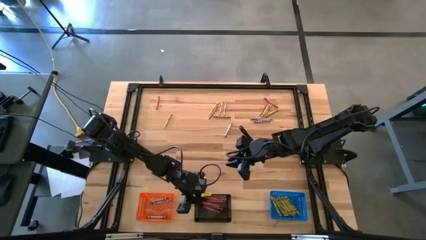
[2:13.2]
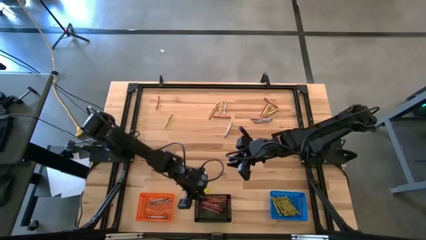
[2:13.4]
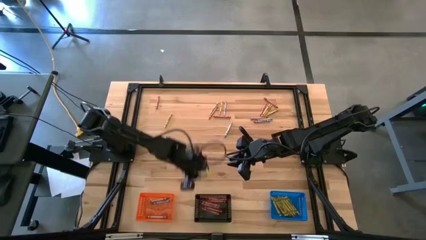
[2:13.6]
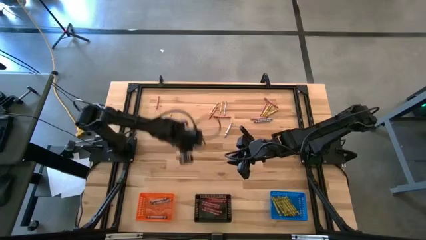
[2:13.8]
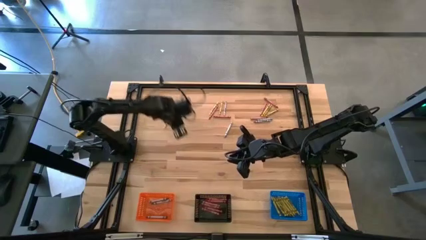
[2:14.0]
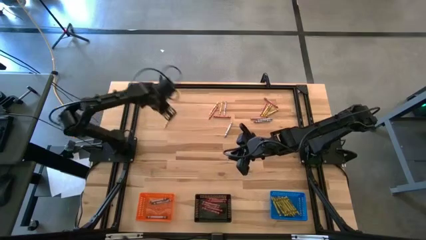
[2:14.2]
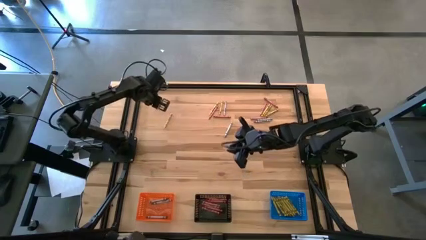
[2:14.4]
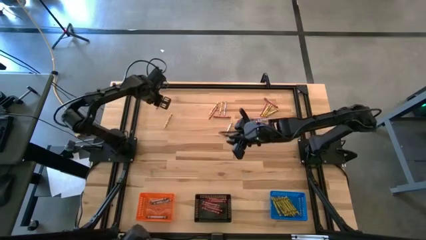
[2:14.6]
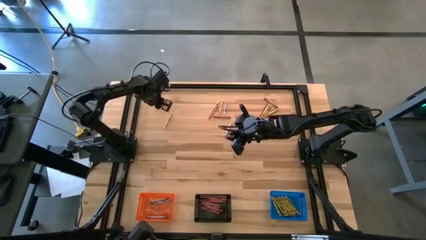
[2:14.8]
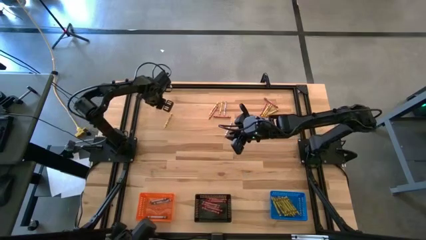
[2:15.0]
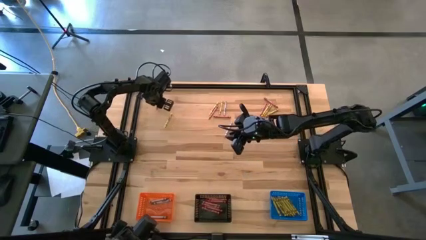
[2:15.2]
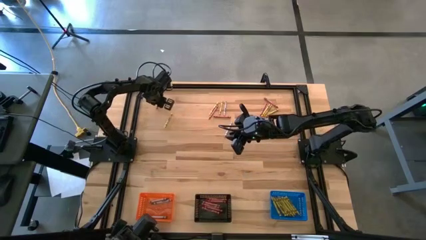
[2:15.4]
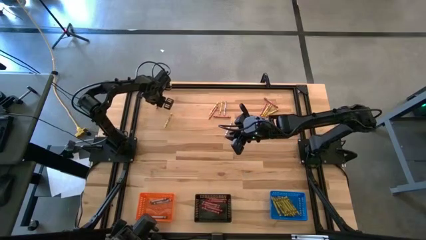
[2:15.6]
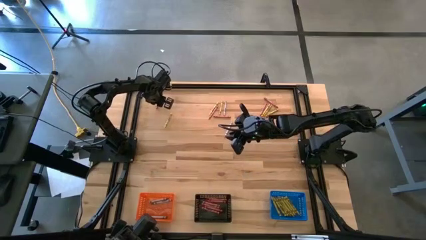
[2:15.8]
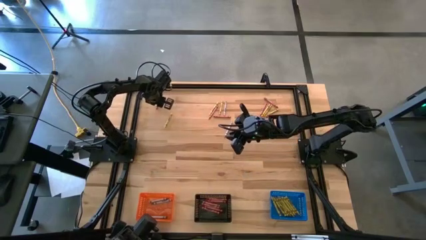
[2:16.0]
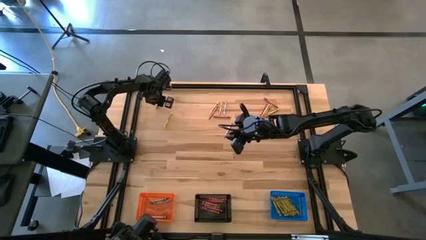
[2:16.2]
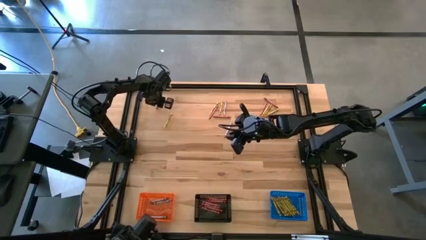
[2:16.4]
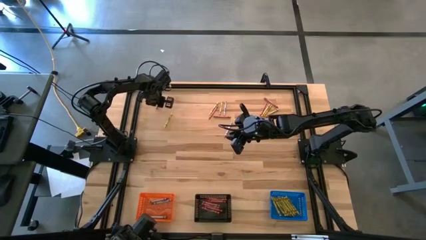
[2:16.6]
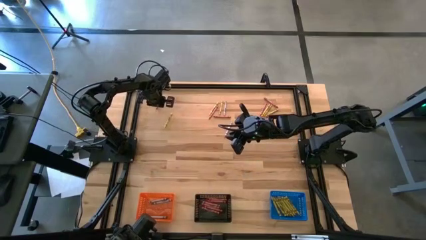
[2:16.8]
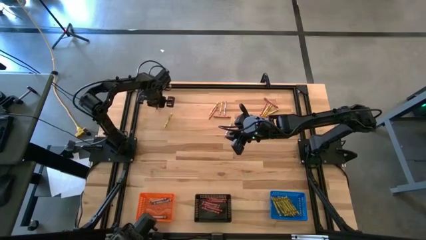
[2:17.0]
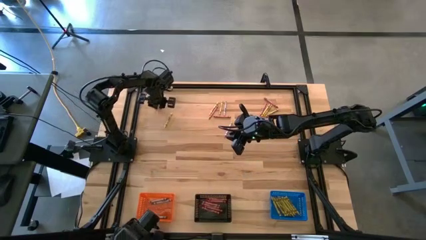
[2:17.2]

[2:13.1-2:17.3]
Task: Sort crayons
Put the red crayon into the black bin

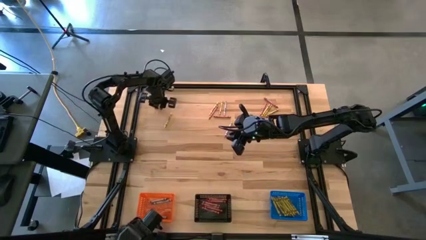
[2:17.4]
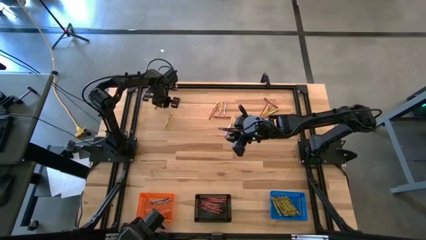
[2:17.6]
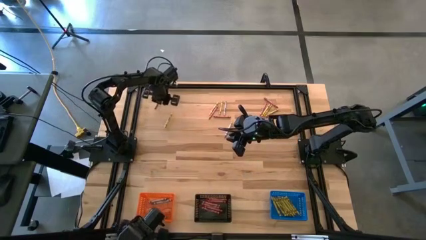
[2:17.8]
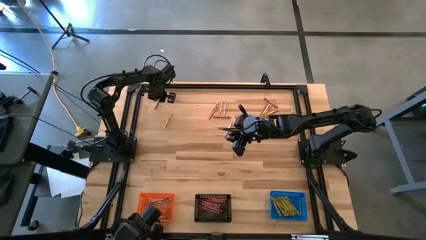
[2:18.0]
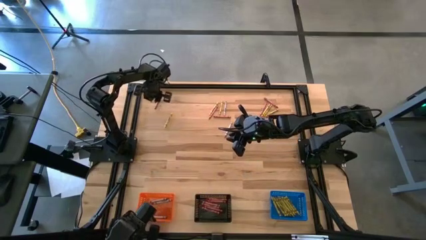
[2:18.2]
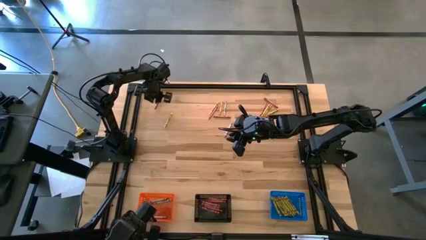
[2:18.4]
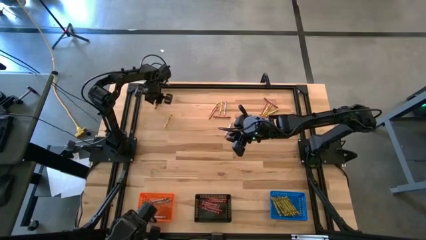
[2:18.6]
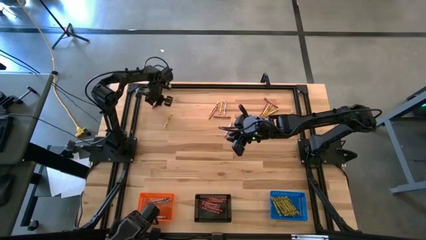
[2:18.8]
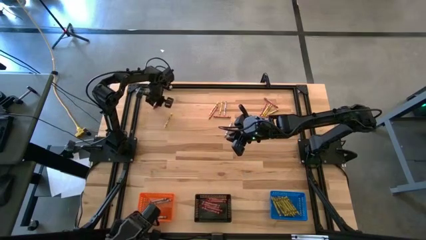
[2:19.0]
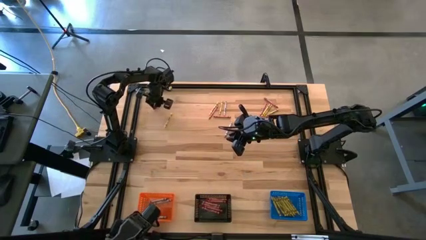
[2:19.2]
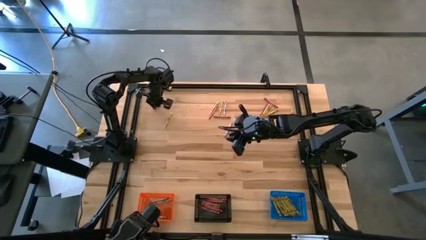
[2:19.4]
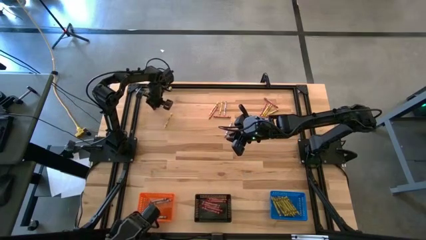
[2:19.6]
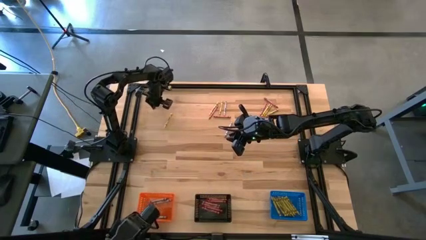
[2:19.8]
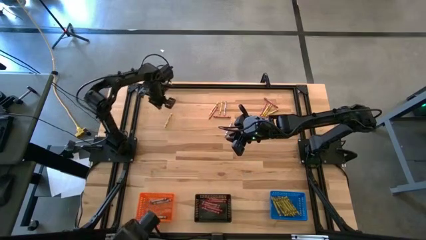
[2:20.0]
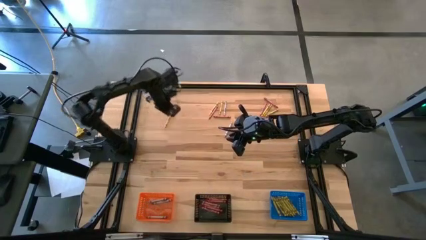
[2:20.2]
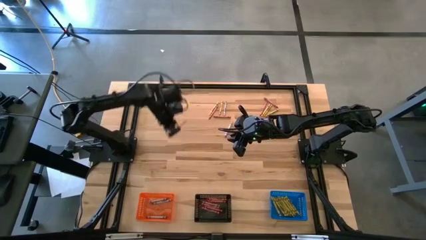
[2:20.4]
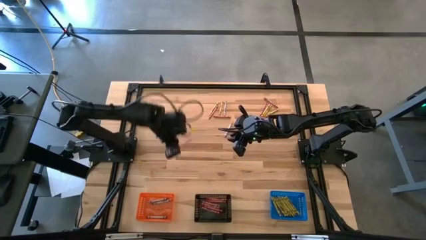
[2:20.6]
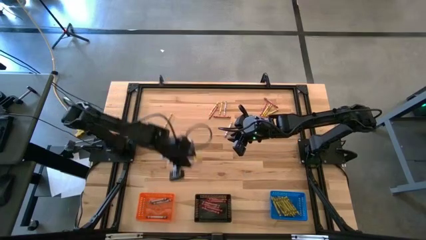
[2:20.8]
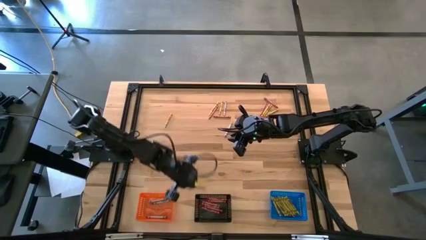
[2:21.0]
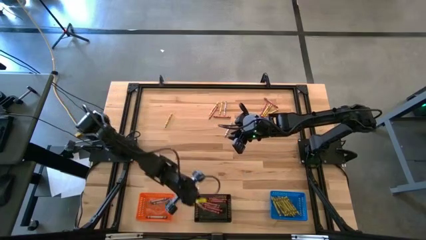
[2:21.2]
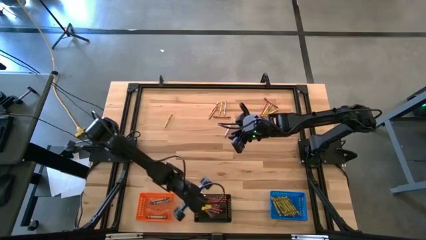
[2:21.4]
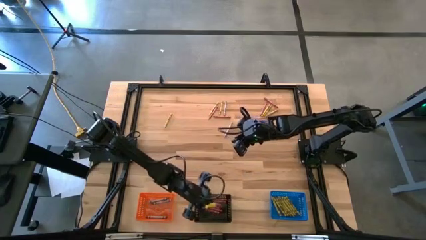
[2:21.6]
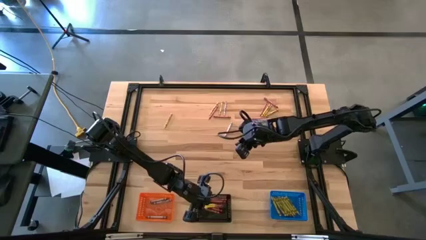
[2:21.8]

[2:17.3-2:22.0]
Put the red crayon into the black bin

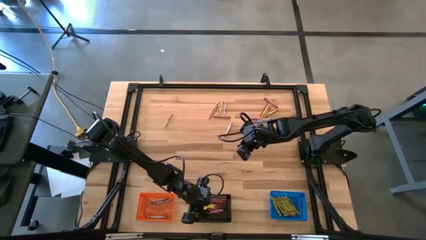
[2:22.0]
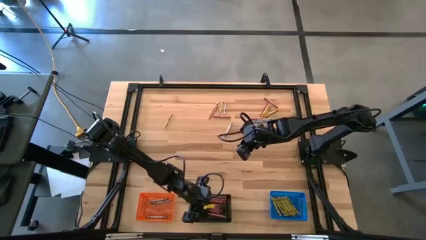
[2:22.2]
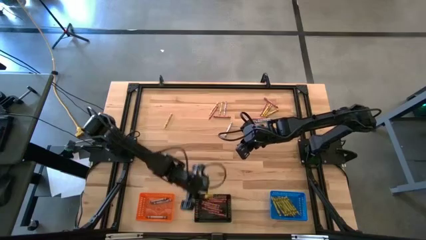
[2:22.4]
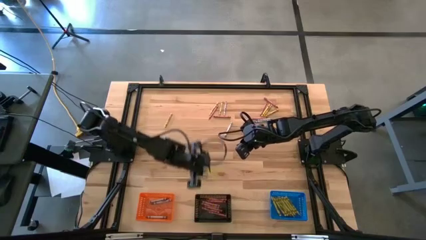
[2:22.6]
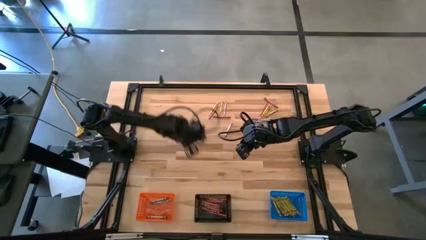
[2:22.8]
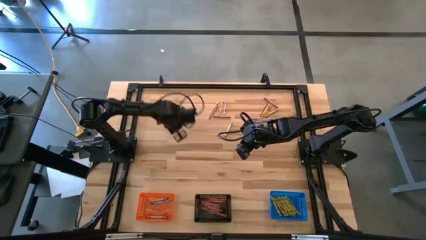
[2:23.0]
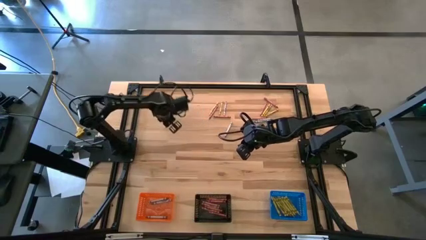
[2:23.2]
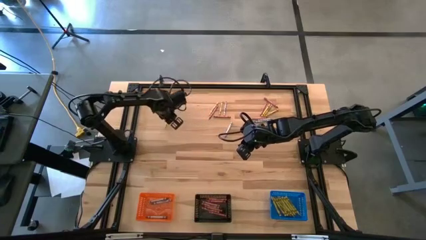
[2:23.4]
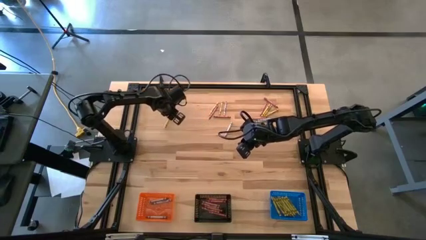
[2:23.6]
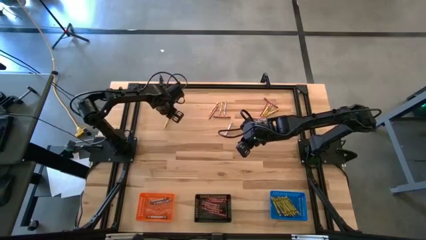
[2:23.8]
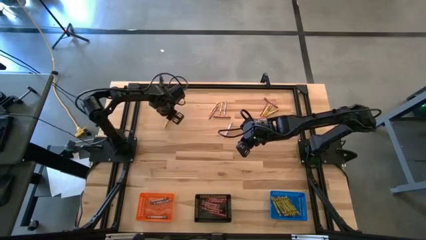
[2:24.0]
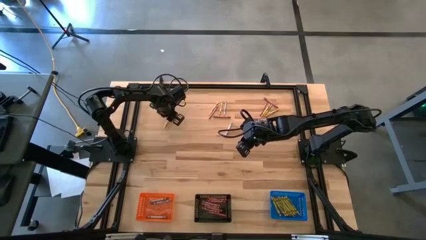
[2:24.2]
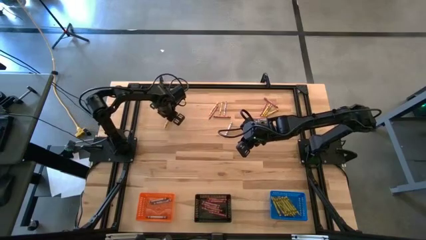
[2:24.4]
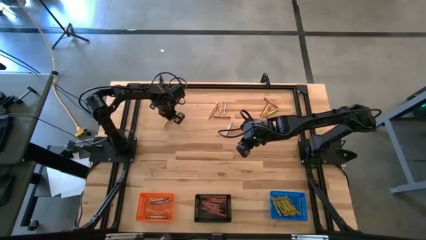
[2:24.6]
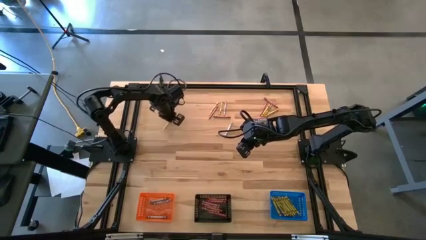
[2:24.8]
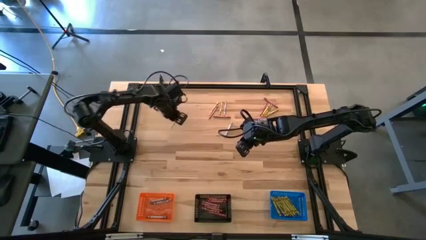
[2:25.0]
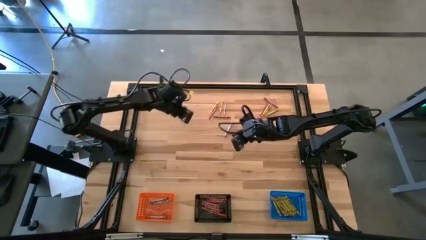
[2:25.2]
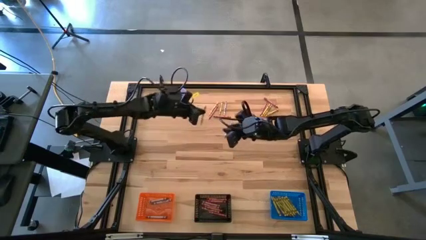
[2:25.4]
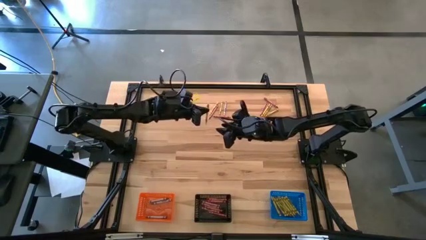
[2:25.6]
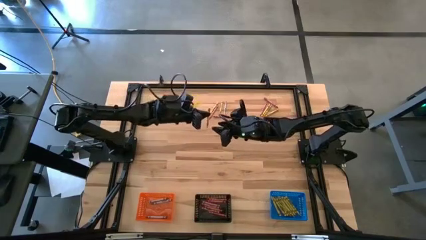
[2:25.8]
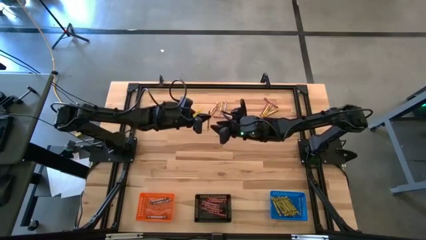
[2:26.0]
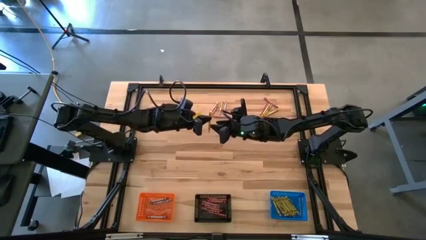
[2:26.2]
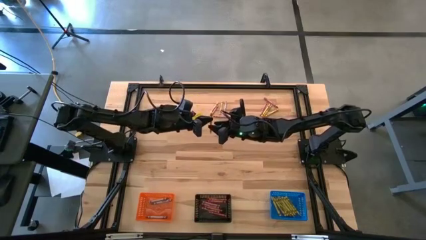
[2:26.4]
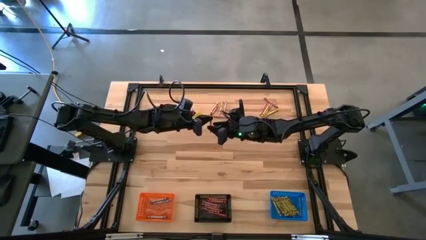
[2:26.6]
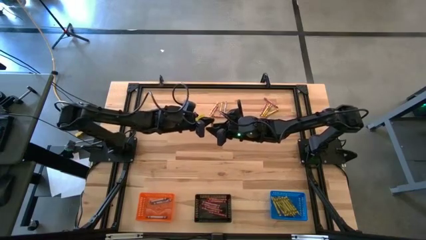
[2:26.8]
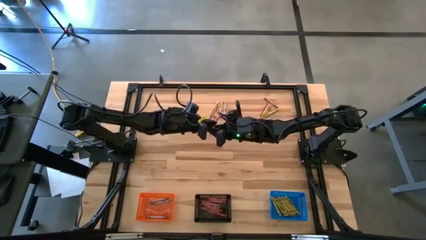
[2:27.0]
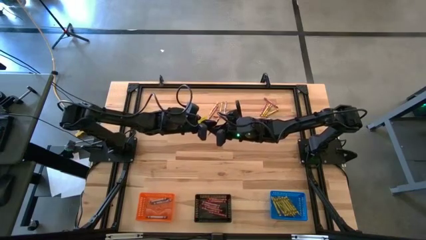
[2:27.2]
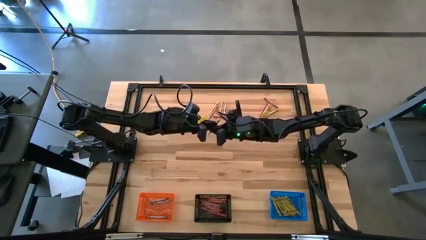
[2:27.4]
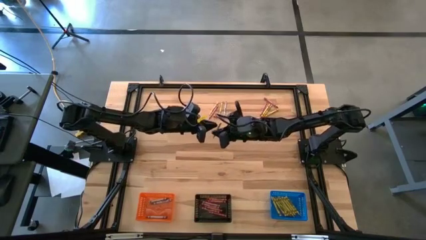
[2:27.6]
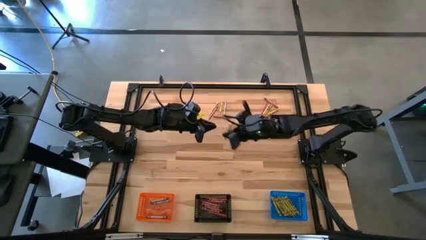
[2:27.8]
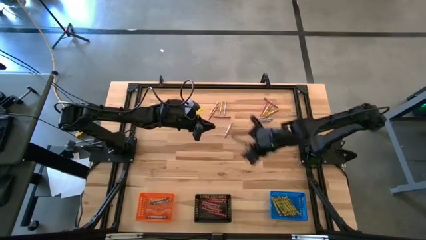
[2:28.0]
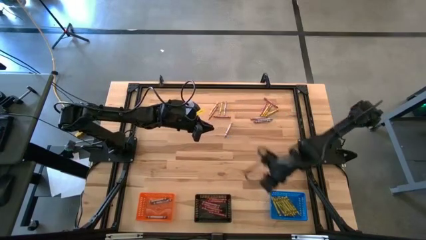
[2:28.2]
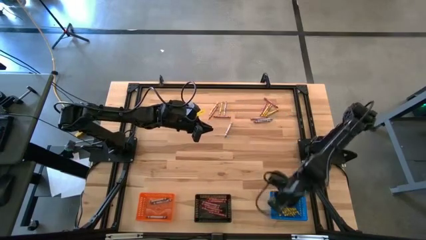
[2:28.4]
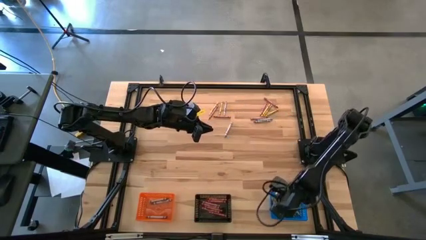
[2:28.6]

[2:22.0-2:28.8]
Put the yellow crayon into the blue bin

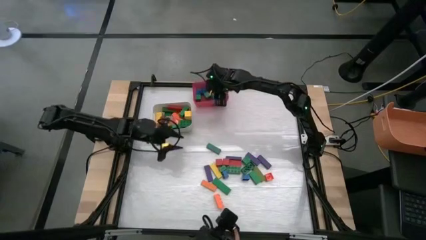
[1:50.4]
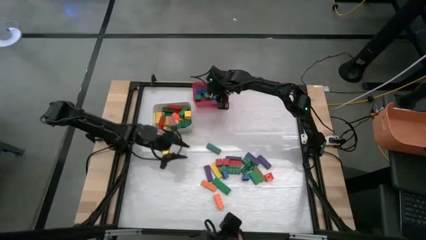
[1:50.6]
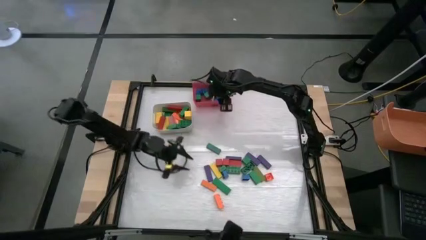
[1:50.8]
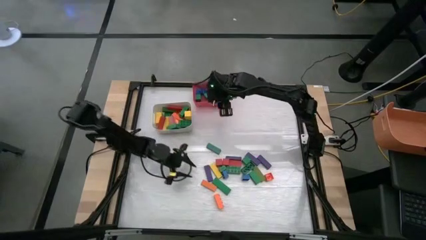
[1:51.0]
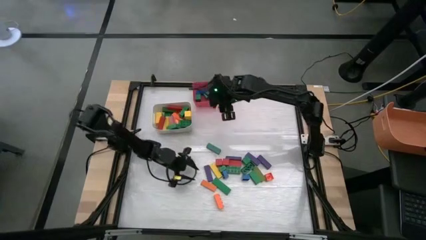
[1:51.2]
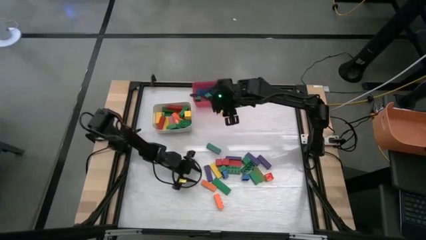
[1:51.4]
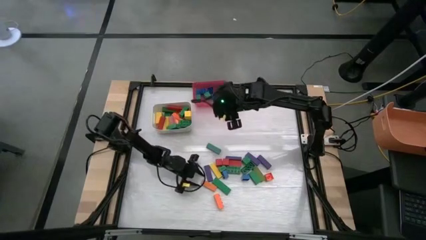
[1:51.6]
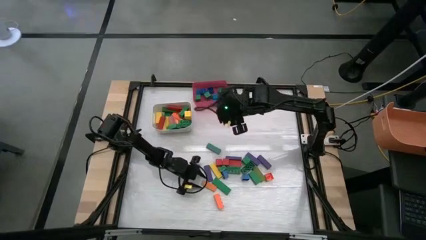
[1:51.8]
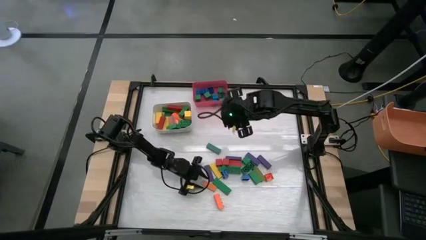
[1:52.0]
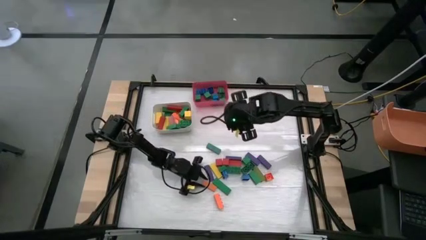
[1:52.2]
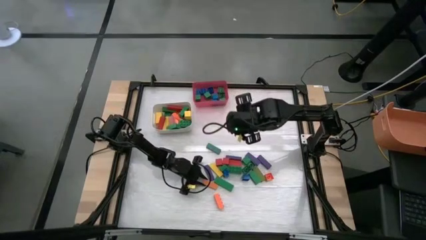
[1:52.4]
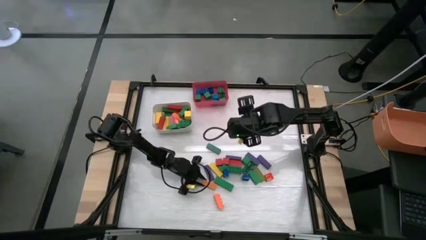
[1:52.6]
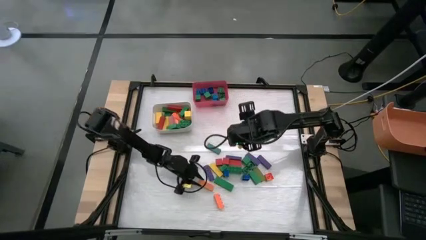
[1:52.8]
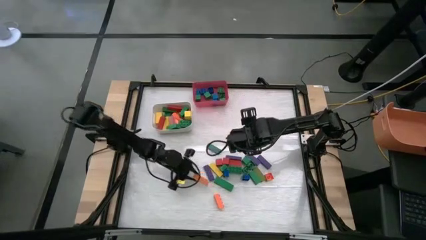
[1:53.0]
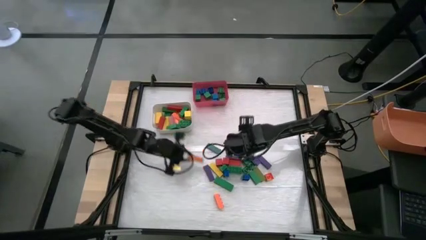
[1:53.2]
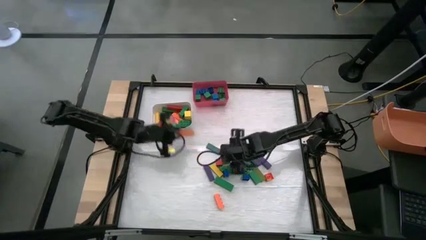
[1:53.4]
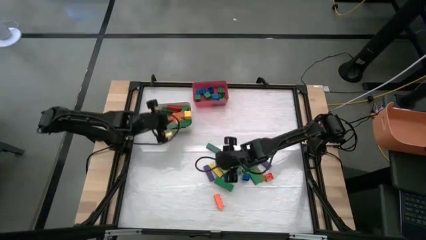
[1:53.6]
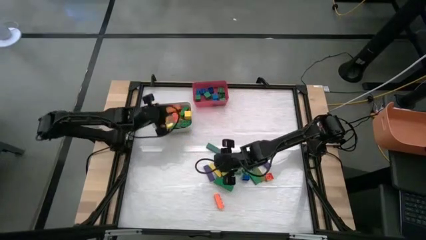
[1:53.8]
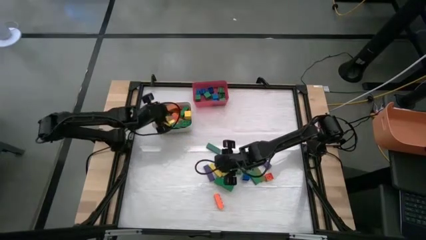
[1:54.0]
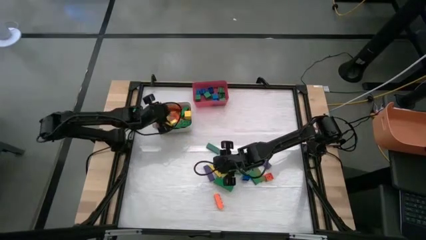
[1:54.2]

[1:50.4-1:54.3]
Task: Sort blocks by size
Put the large orange wooden block into the white bin
